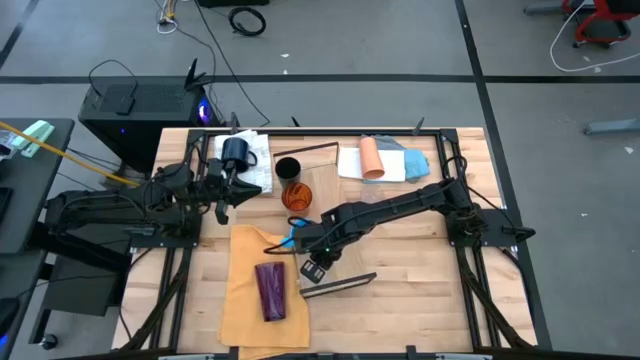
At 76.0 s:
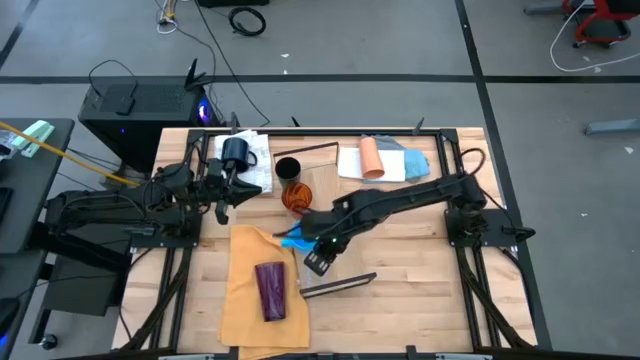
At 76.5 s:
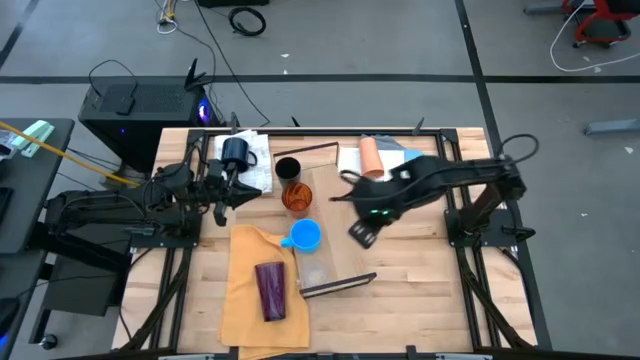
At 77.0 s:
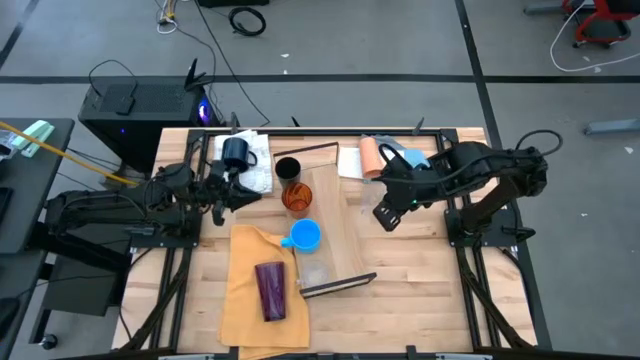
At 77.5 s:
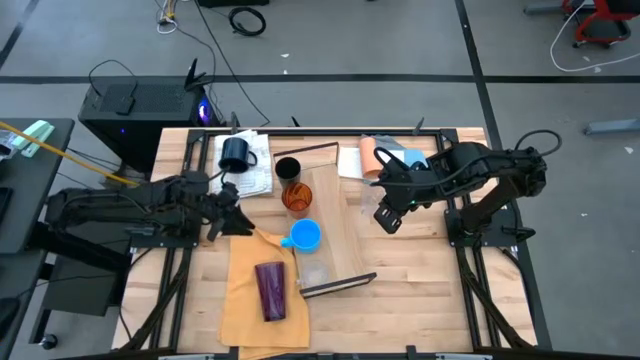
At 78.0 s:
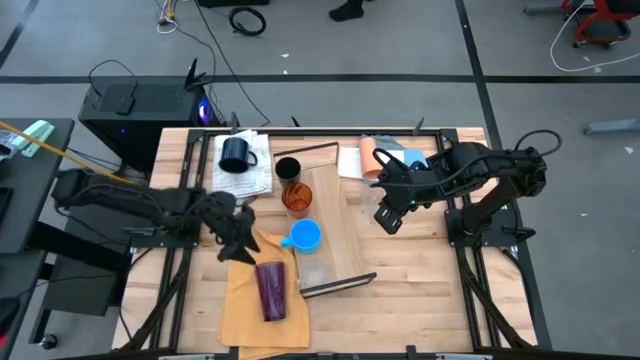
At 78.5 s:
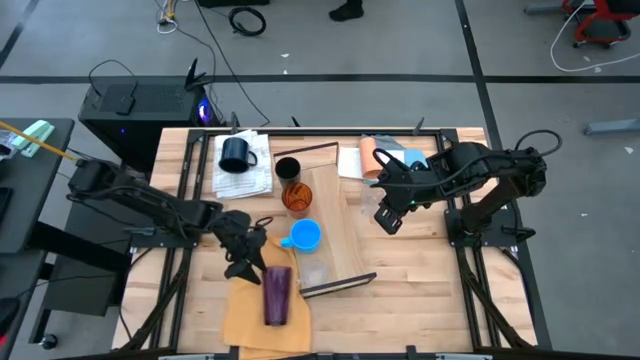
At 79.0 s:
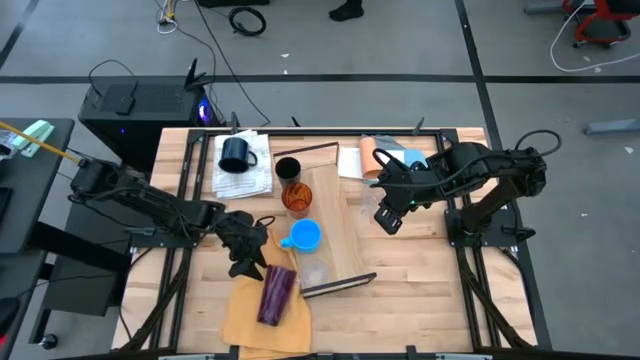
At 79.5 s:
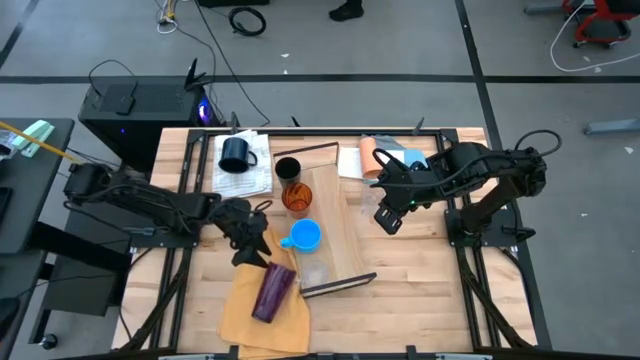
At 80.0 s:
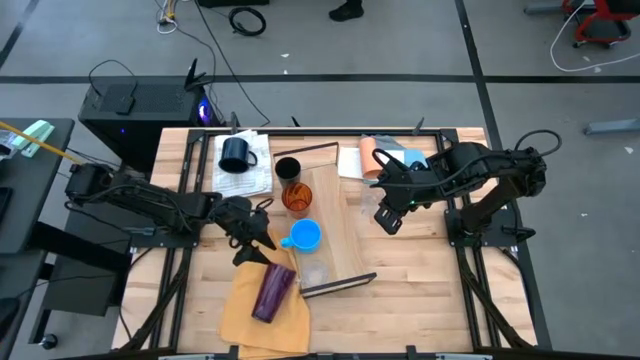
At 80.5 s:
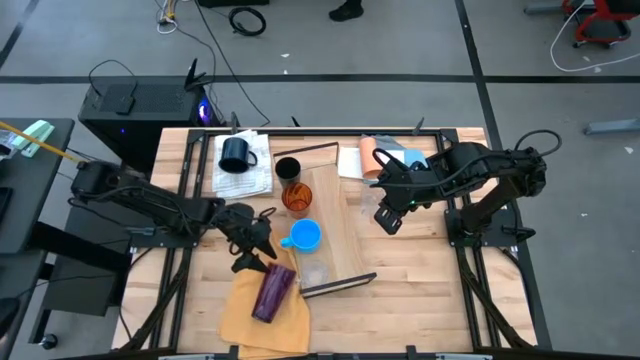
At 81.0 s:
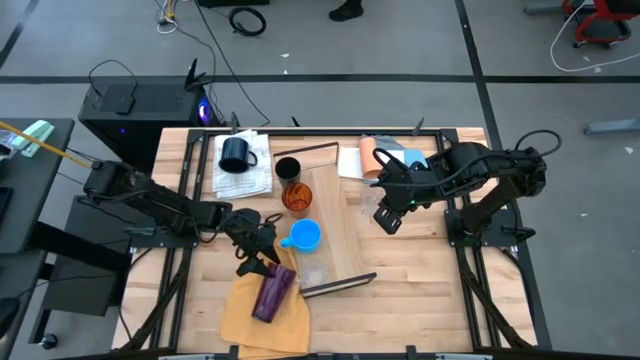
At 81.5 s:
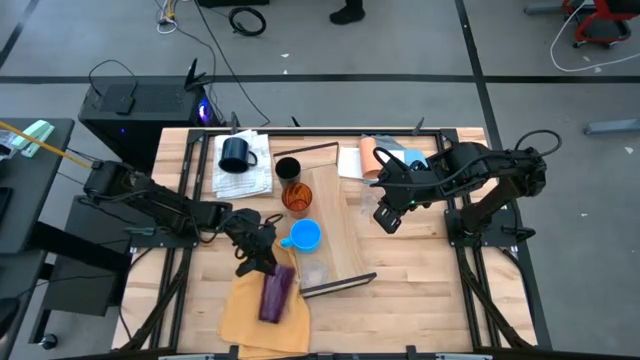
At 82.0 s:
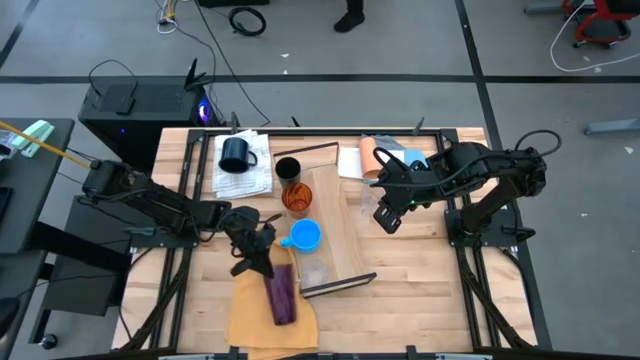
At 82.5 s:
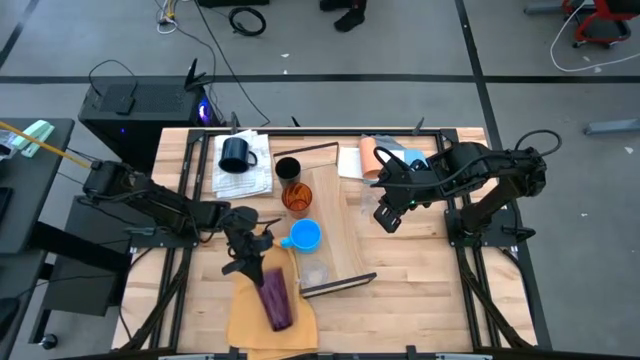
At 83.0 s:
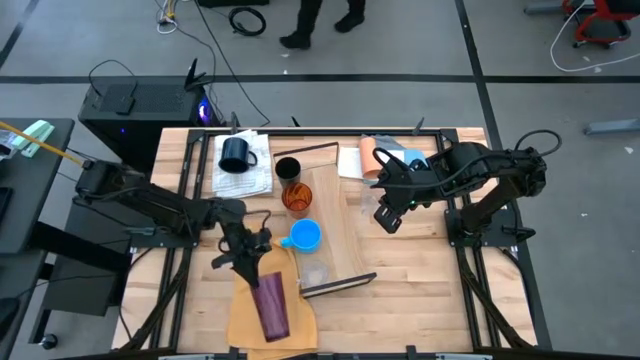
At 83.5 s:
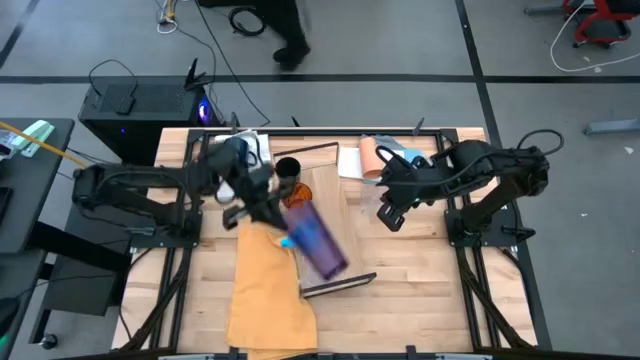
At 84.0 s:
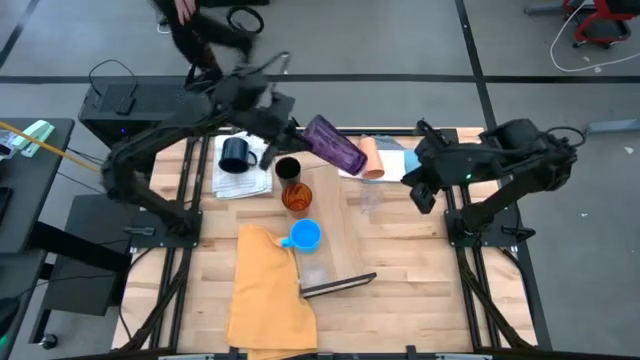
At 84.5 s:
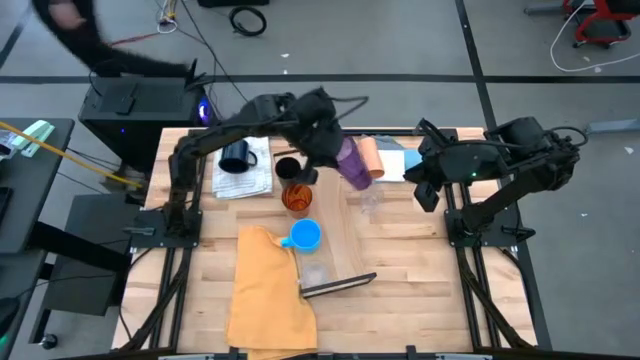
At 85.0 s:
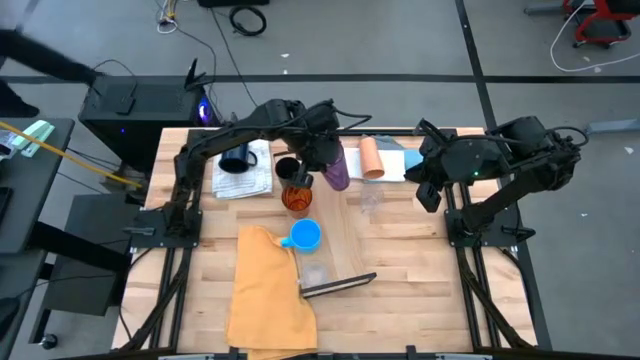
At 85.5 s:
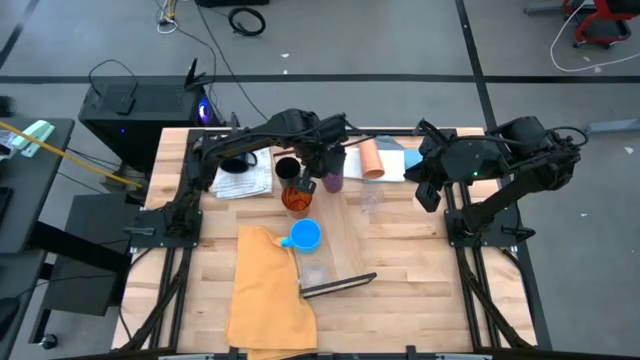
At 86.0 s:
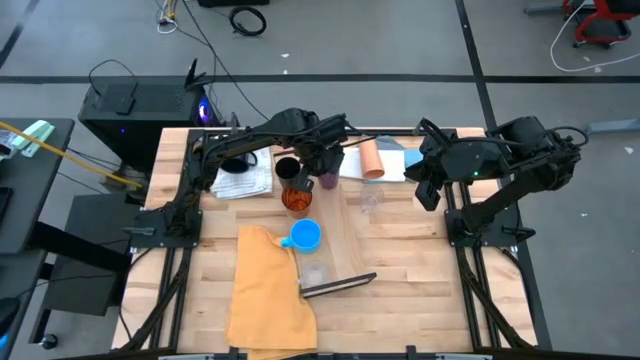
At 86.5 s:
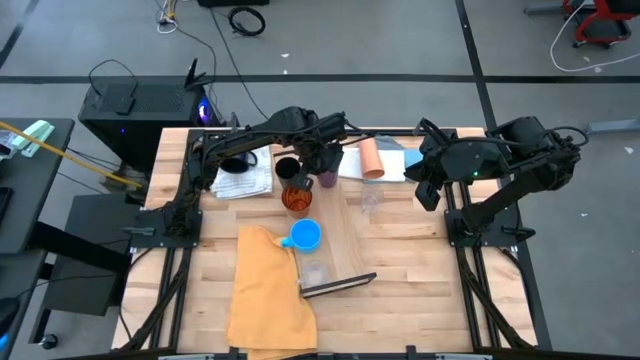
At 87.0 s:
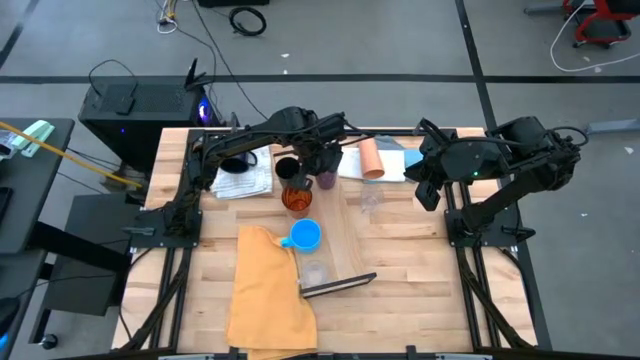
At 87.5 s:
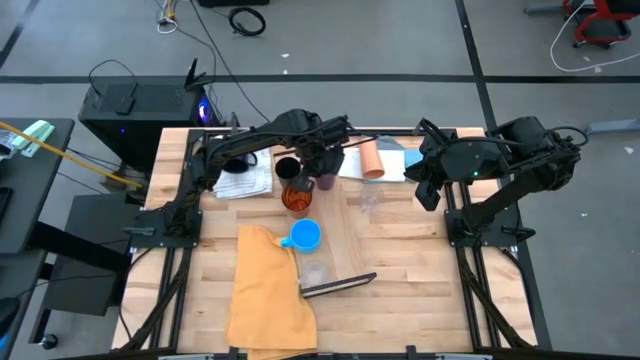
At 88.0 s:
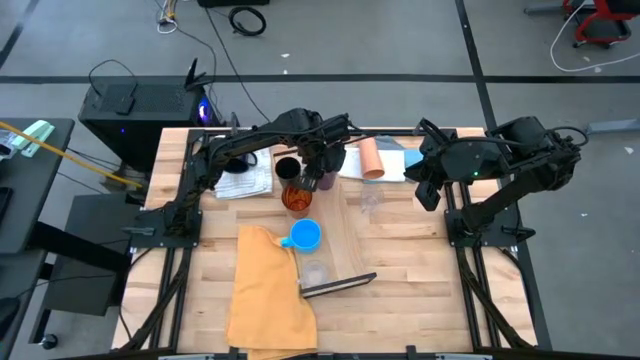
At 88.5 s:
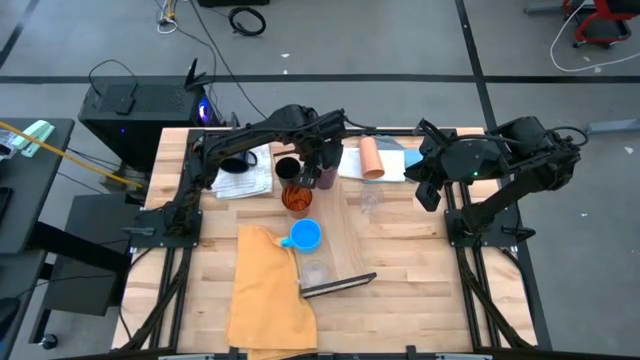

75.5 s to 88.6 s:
Task: Stack small to large cups/mugs on shelf
Put the violet cup on the shelf

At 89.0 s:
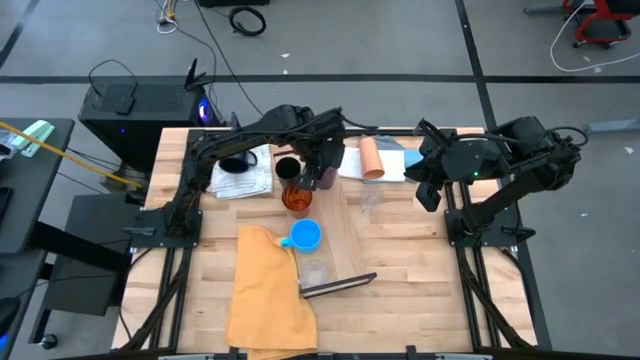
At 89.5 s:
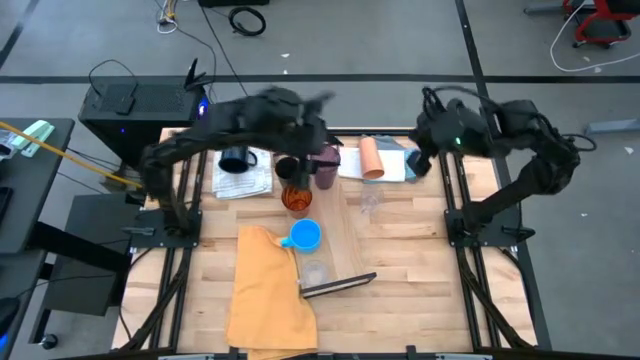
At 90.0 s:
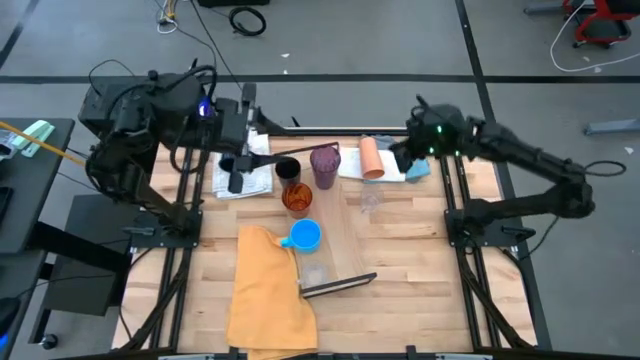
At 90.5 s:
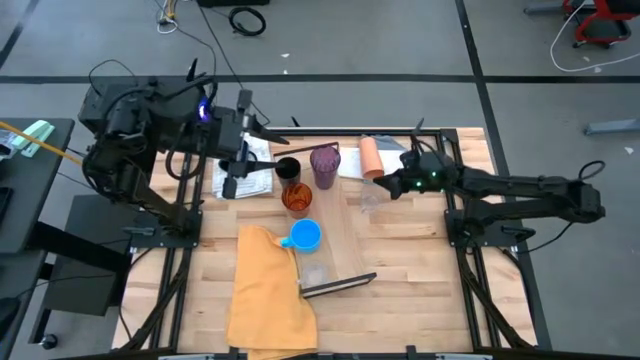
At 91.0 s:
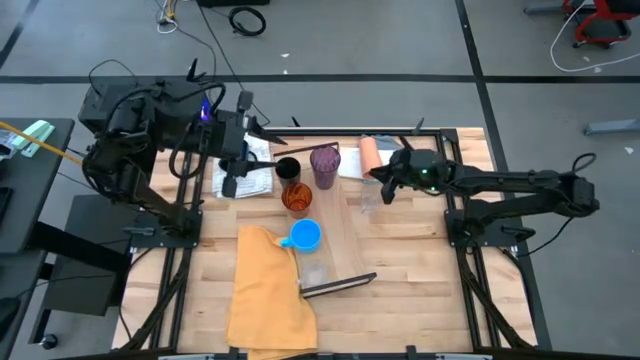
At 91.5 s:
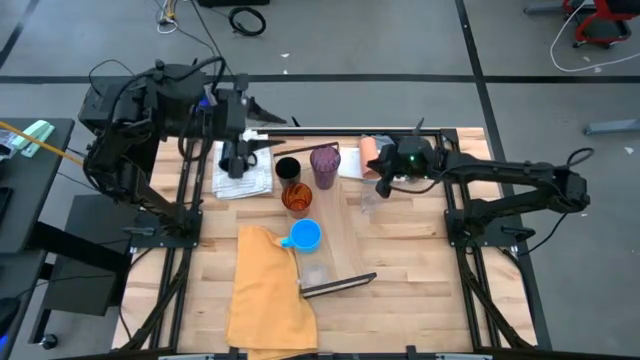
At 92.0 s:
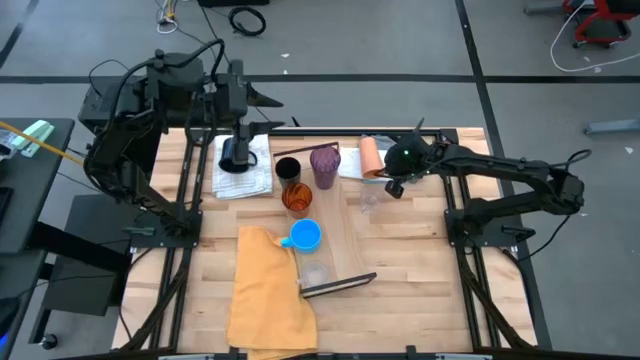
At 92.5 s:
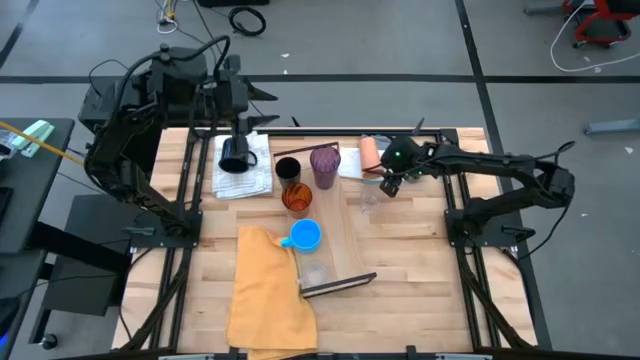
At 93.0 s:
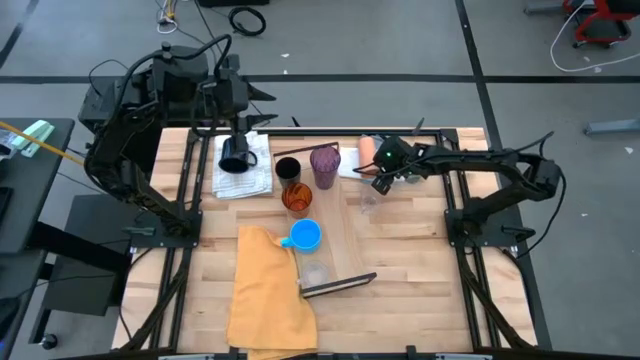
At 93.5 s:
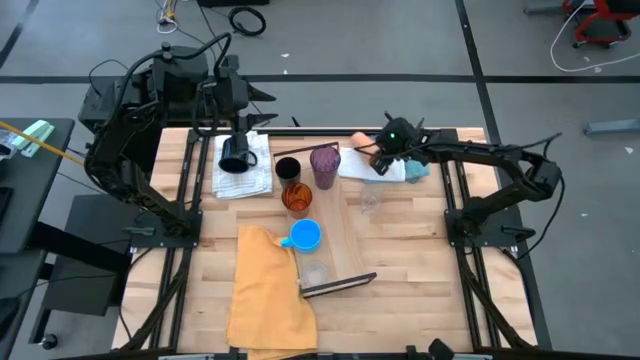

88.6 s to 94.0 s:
Put the light orange cup on the shelf

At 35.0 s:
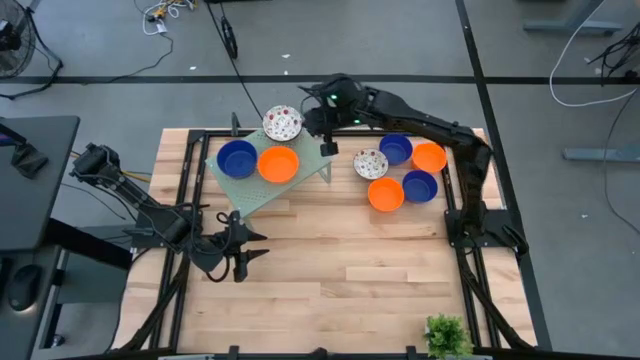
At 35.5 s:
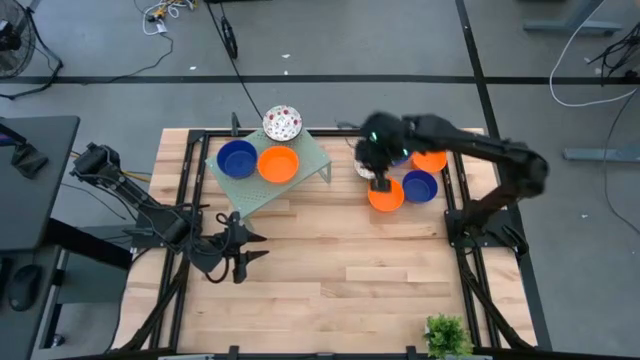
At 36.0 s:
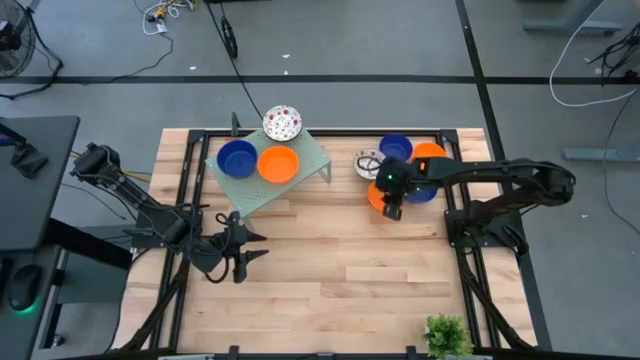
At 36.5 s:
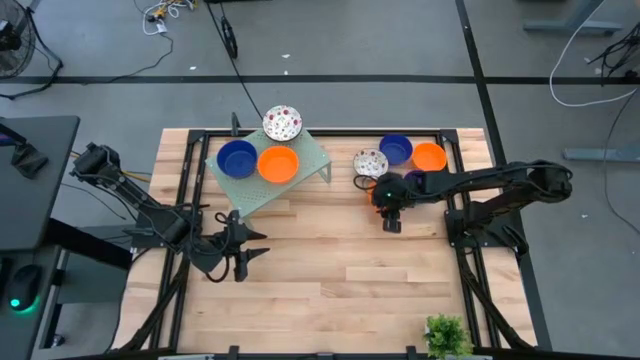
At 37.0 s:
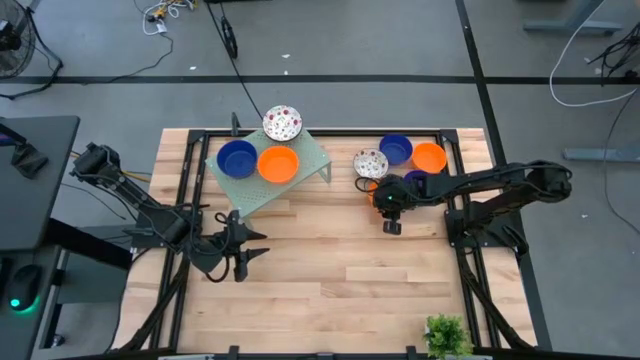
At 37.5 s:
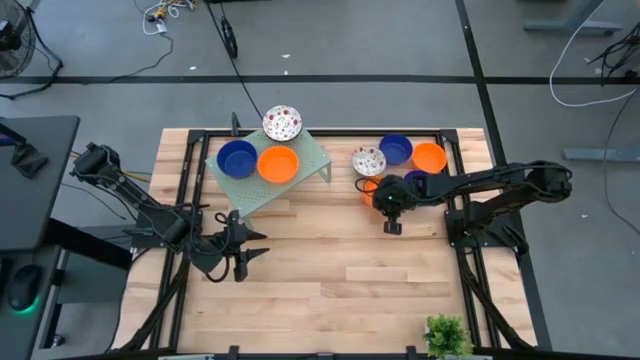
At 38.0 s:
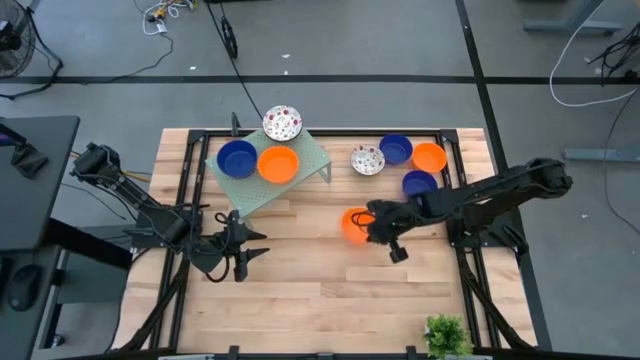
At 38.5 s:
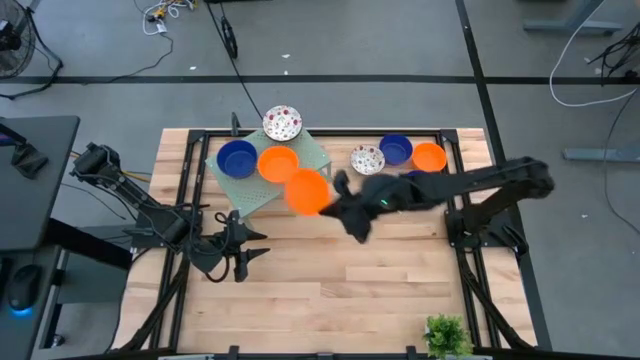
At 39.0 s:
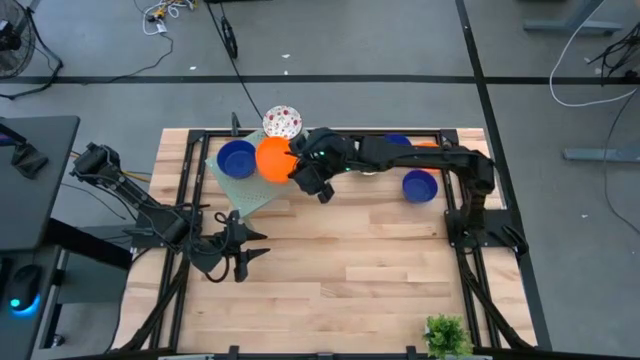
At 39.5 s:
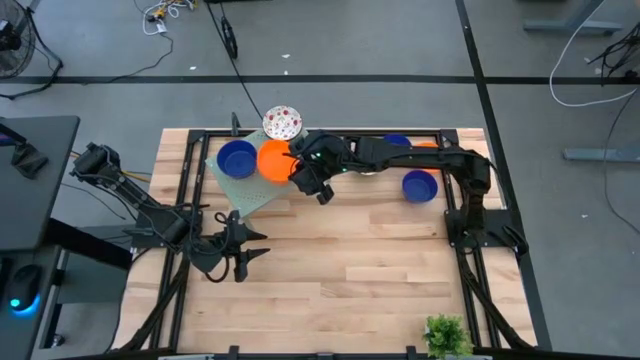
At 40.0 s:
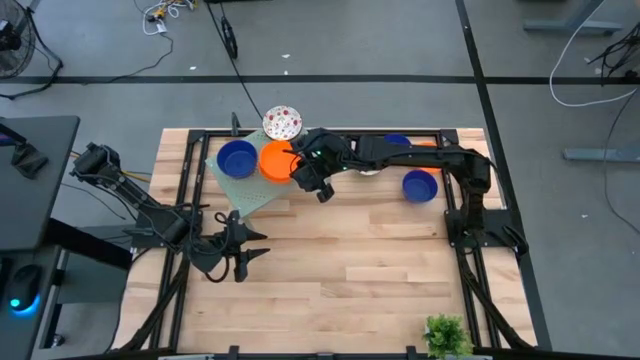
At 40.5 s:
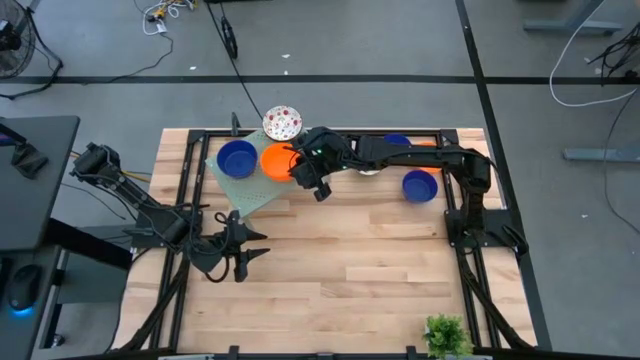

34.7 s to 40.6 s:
Task: Pick & Place Mini bowls
Stack the orange bowl on the orange bowl on the shelf
